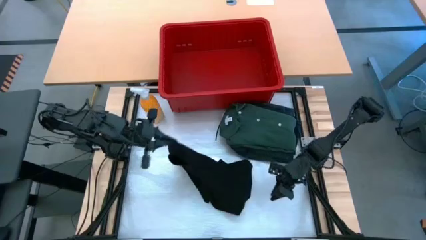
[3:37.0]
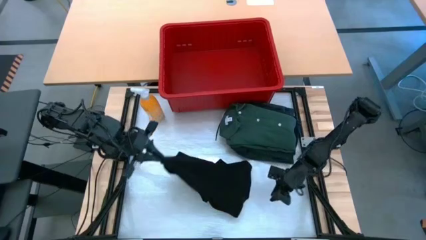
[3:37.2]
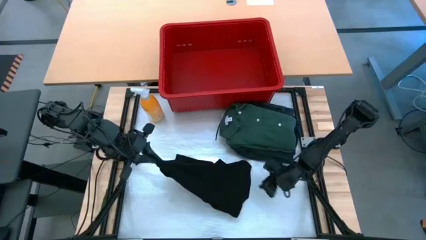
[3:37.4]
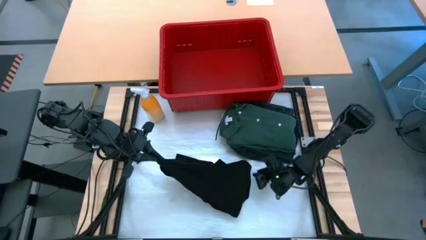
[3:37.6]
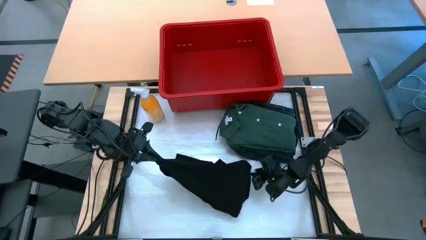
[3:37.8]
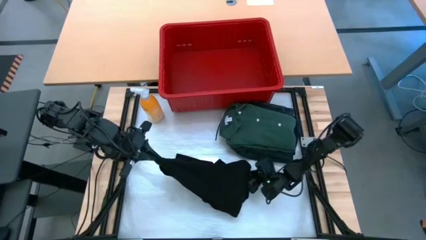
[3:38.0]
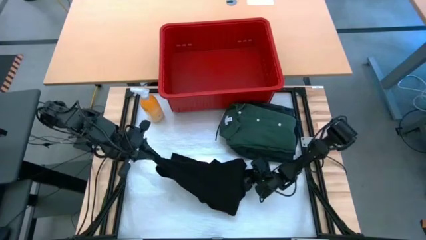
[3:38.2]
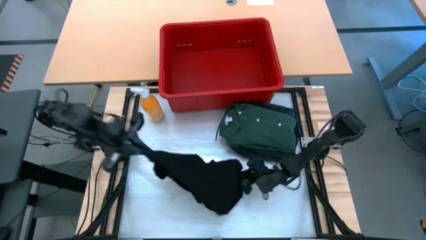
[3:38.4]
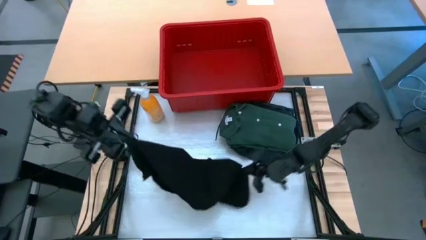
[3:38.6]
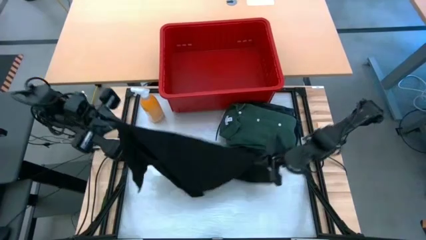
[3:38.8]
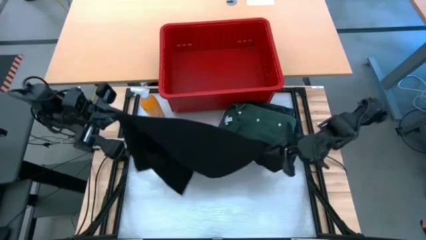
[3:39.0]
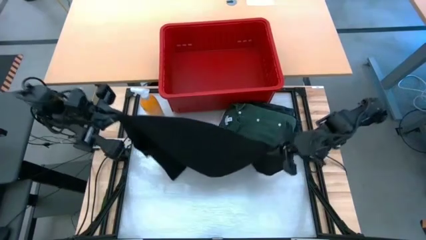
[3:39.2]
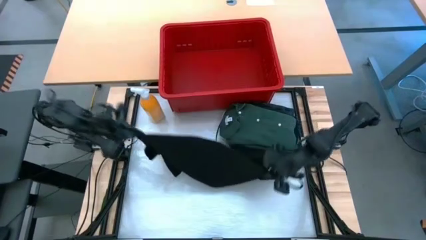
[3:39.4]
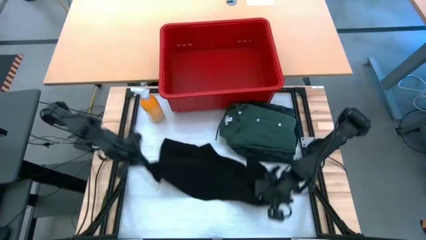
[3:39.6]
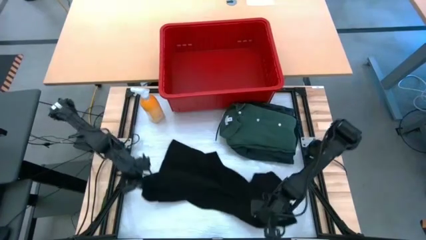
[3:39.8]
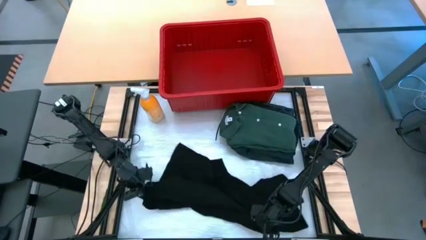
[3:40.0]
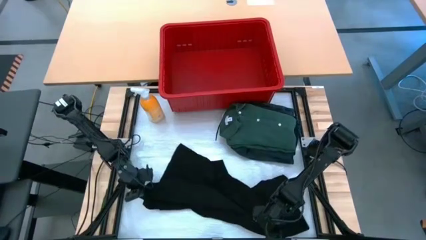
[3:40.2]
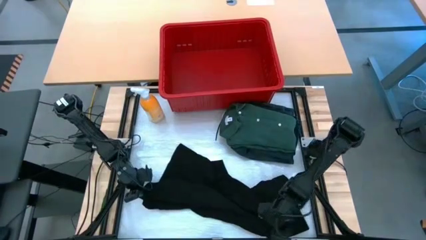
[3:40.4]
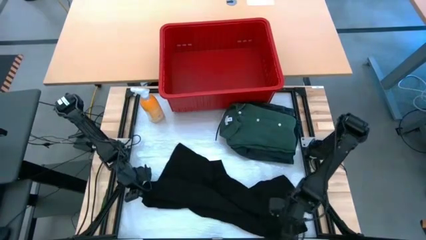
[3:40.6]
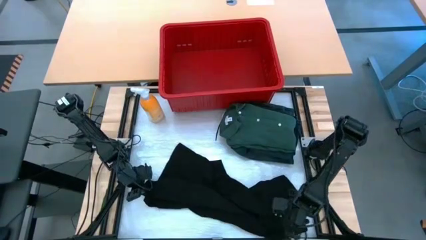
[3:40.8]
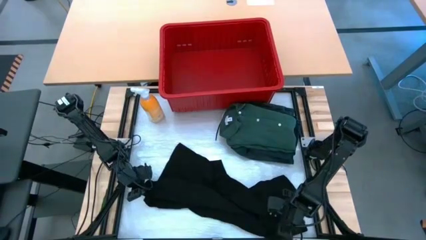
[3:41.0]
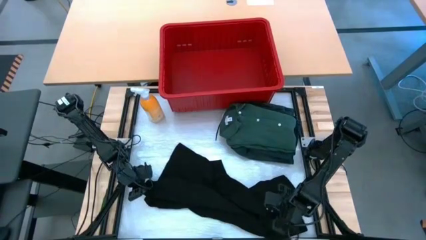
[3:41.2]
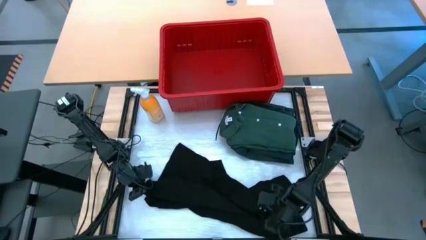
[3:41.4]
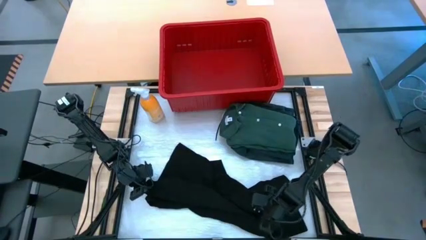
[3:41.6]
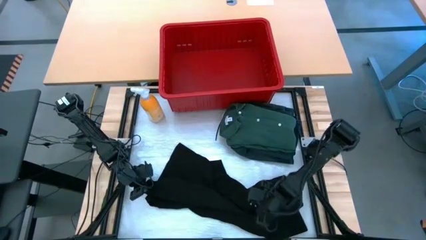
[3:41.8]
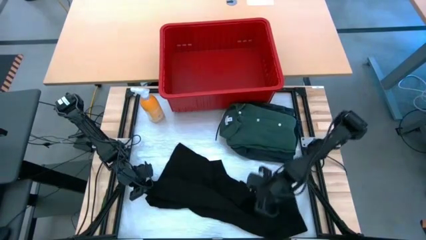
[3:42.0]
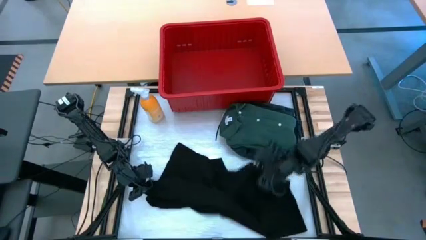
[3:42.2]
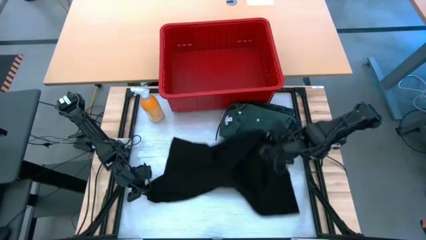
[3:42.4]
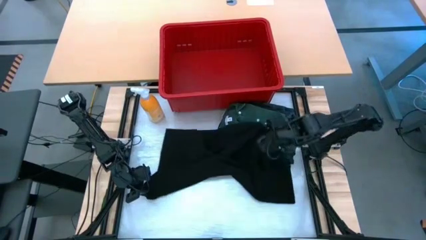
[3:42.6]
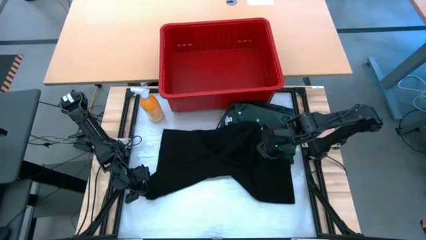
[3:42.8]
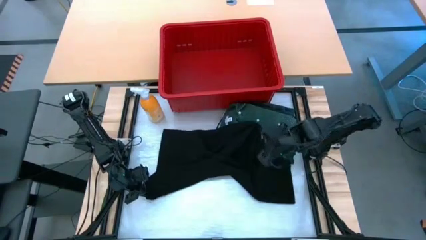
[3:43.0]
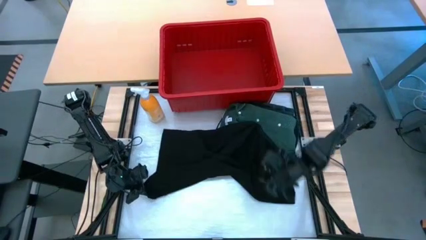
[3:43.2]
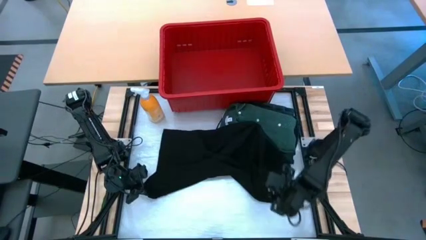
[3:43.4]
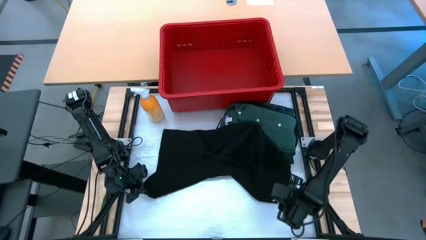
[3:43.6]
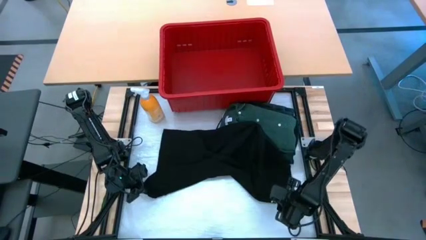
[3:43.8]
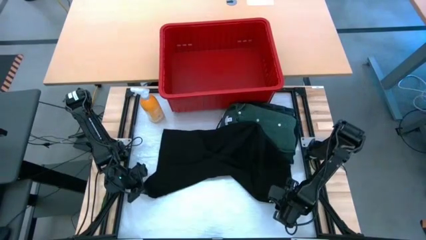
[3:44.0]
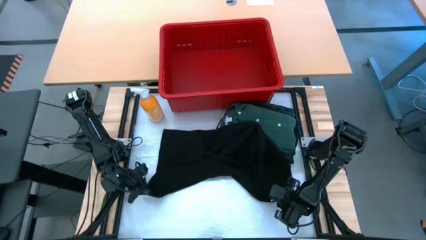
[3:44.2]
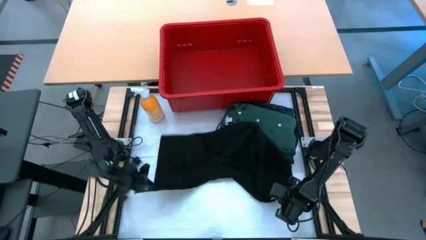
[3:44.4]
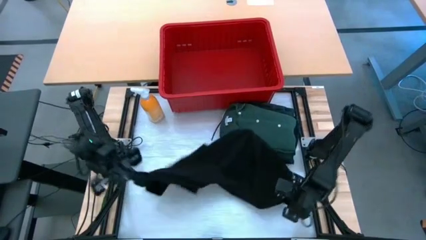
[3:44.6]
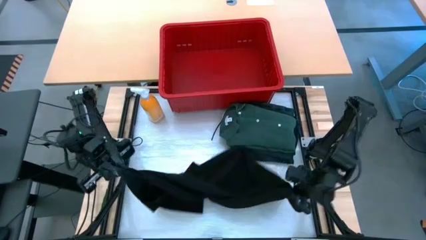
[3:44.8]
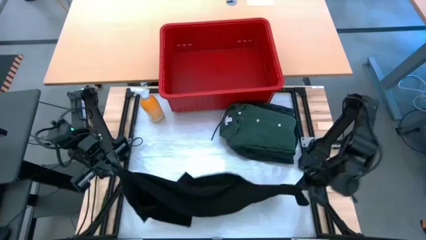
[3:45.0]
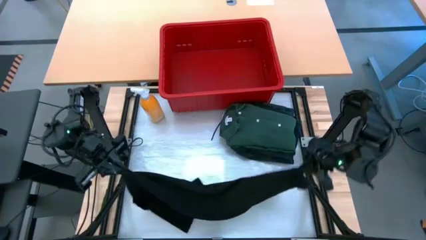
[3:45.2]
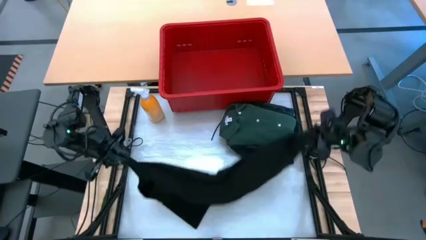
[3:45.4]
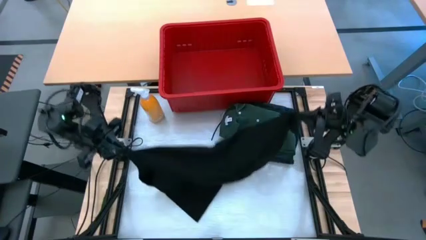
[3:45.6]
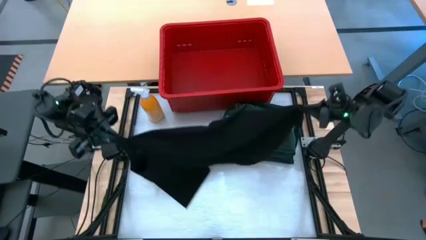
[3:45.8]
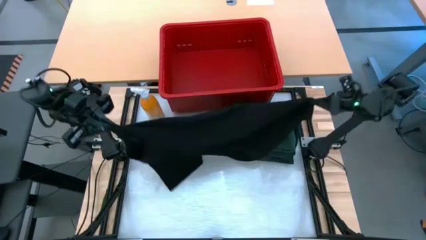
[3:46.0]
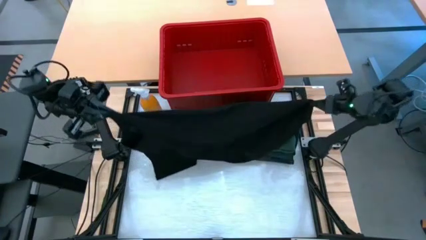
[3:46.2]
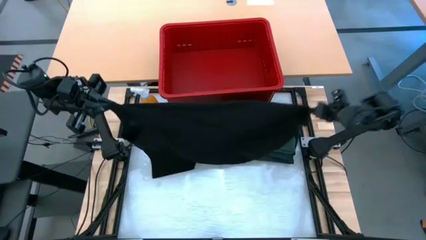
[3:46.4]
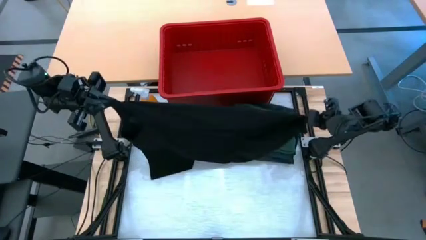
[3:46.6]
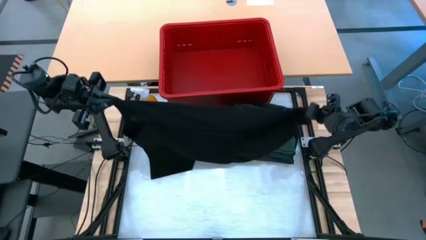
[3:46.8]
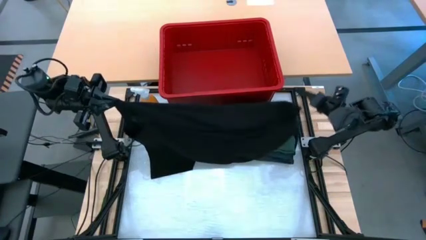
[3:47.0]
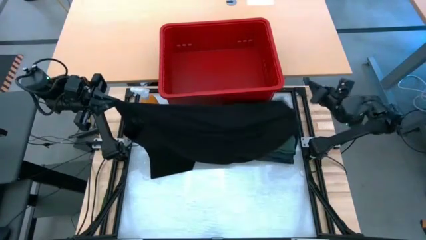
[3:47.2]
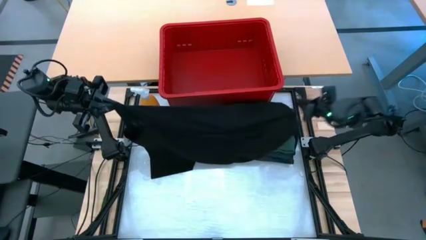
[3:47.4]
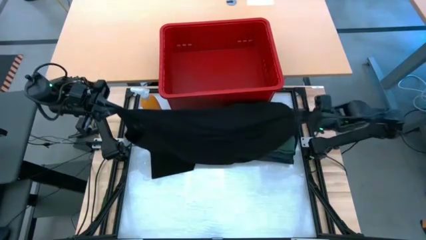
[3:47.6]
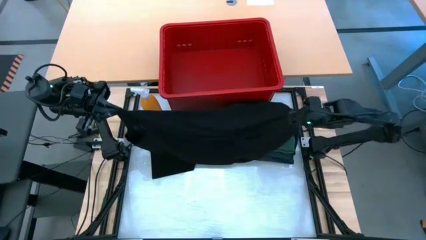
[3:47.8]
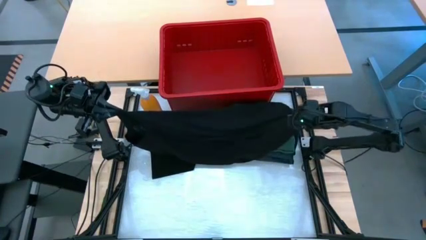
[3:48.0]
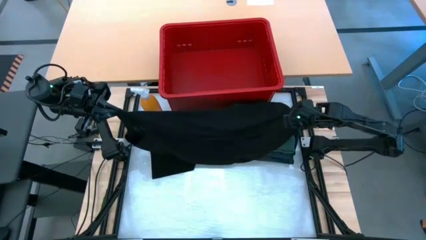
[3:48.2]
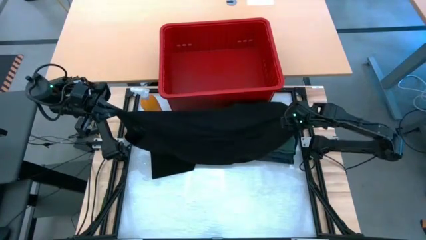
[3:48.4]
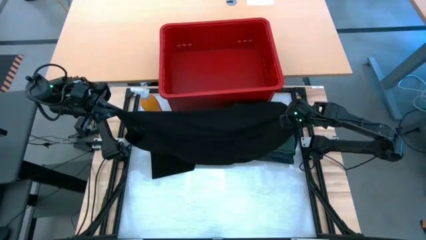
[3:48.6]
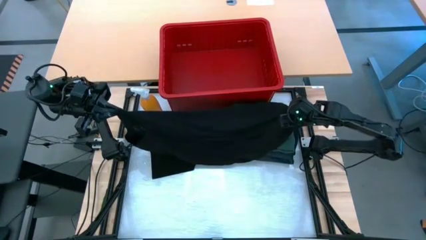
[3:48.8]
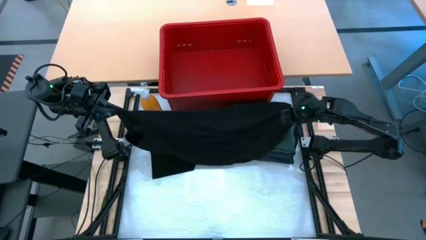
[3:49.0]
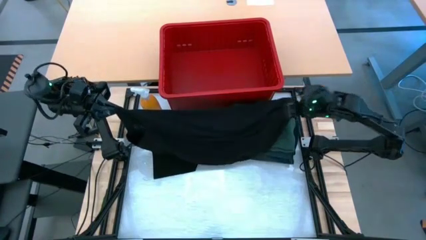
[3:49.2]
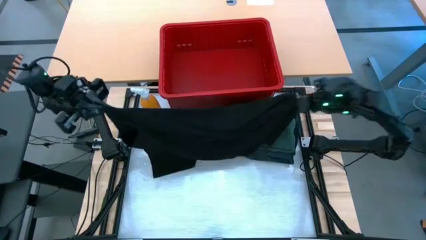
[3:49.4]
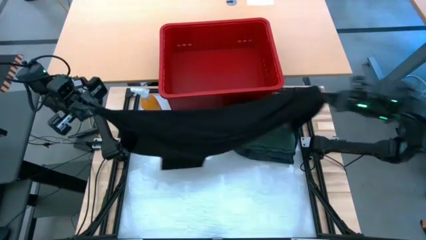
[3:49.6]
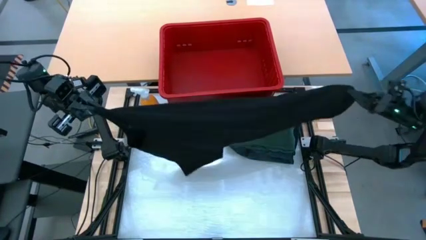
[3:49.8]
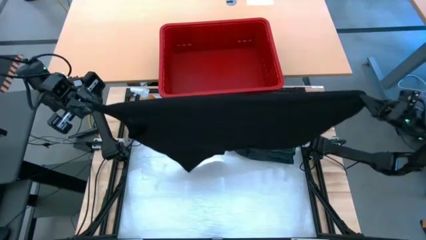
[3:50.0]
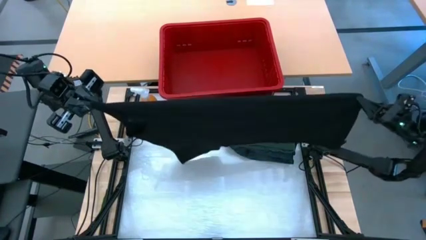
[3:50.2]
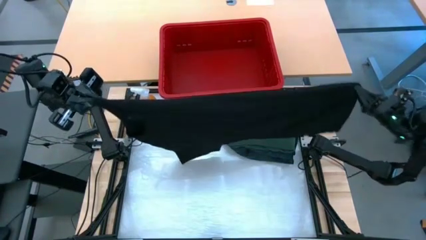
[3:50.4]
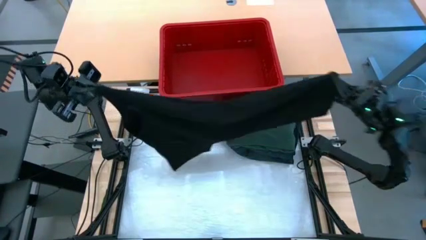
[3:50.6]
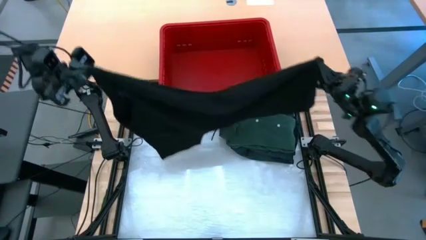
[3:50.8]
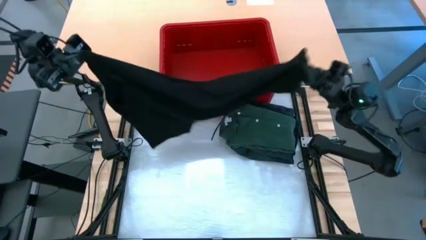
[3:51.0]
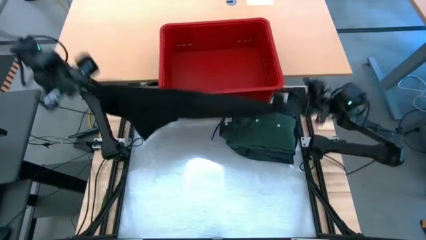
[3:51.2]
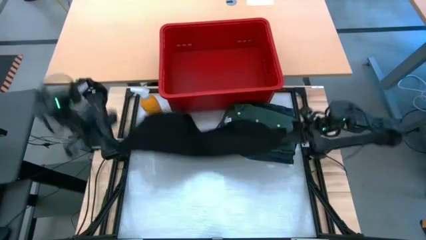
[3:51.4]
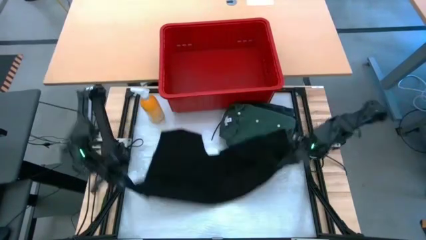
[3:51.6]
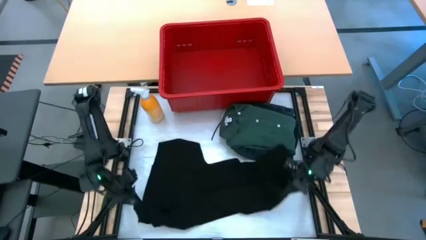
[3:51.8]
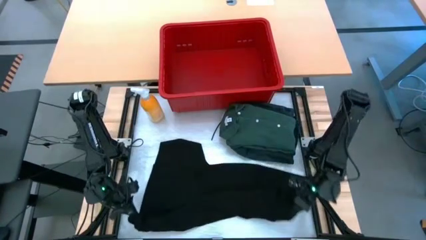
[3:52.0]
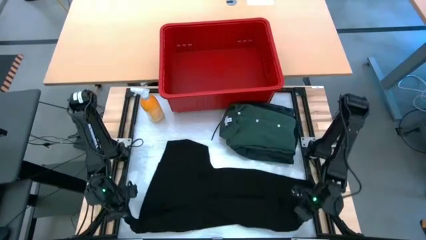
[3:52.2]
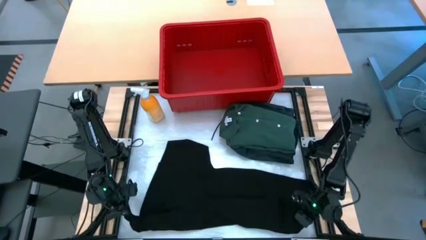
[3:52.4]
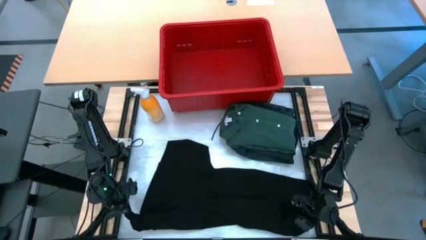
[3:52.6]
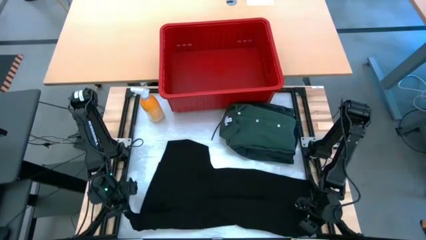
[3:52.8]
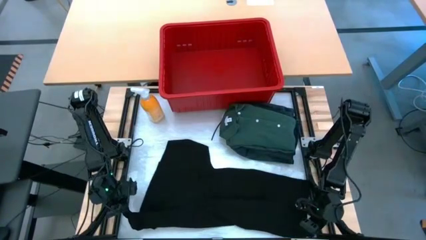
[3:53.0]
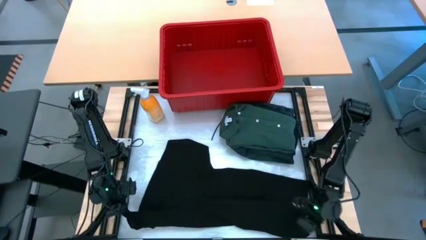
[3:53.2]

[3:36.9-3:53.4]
Task: Fold laundry
Fold the black shirt

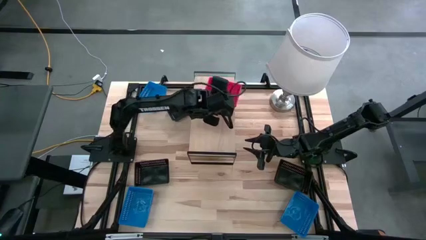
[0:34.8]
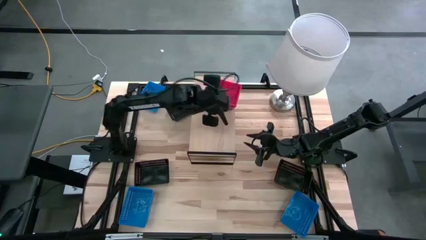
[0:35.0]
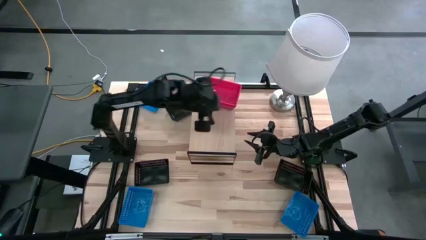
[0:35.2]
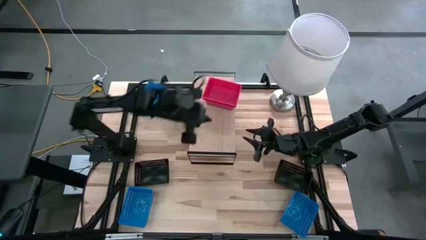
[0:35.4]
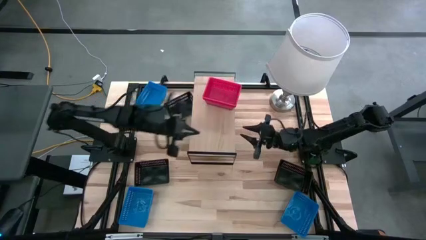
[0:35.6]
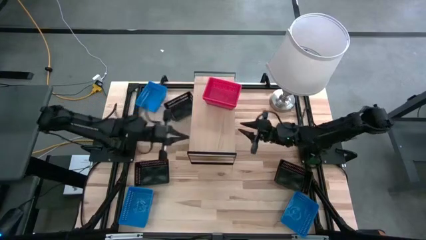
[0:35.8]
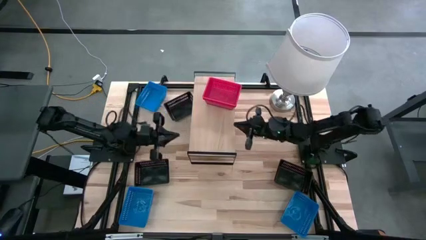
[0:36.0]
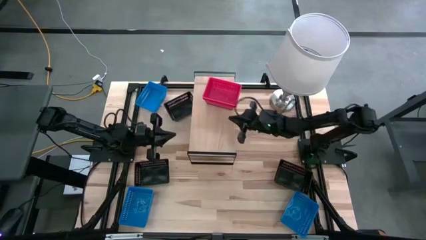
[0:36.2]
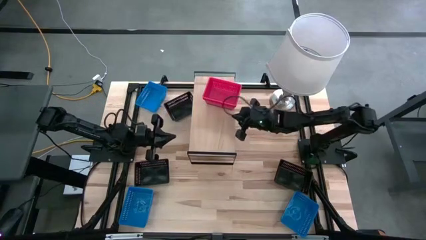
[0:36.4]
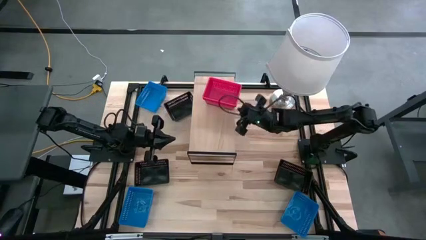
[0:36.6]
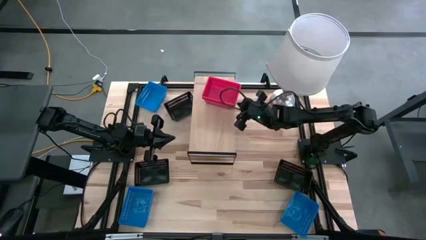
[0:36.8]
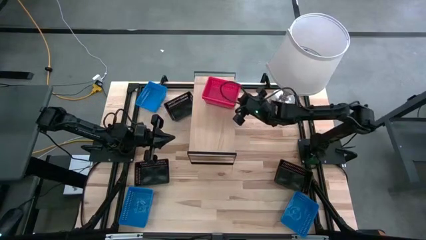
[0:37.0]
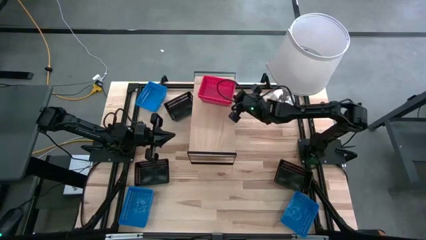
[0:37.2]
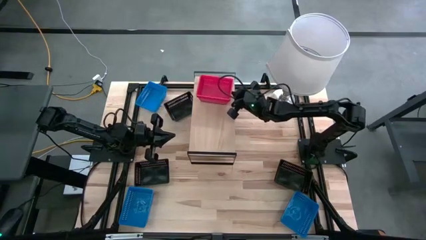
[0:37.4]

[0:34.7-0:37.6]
Task: Stack baskets on shelf by color
Adjust the stack of red bins on the shelf
